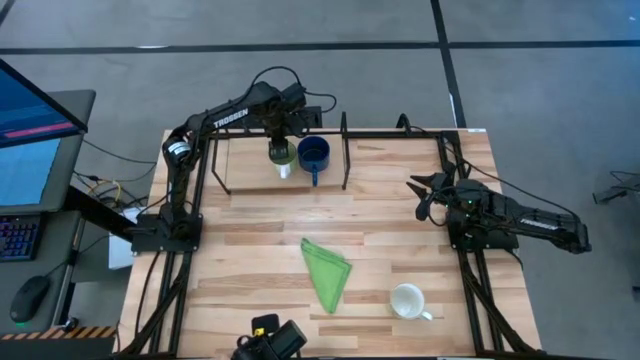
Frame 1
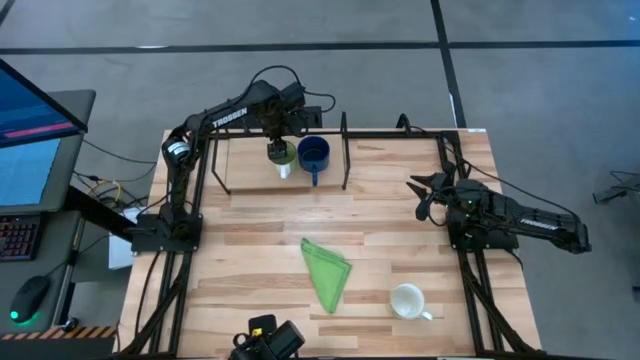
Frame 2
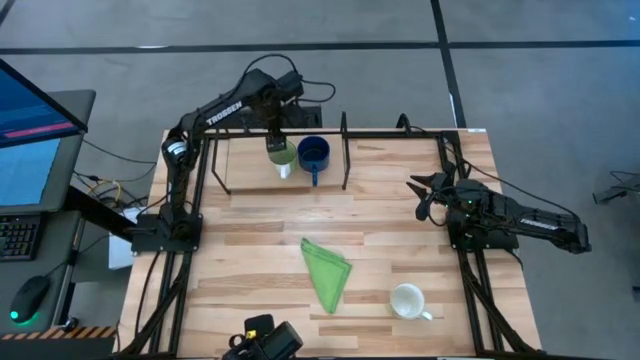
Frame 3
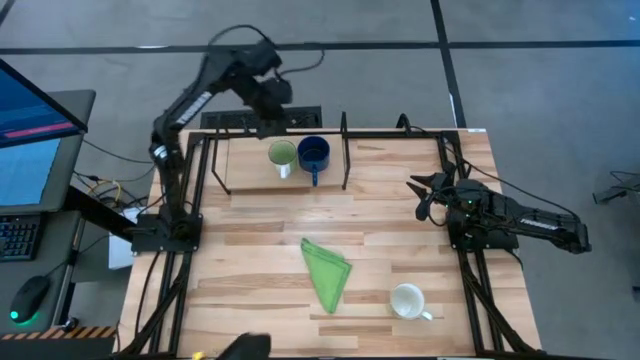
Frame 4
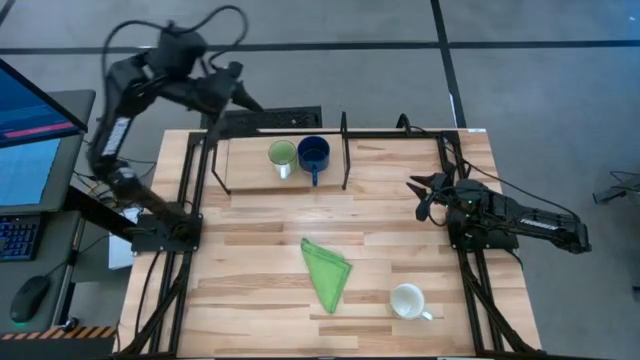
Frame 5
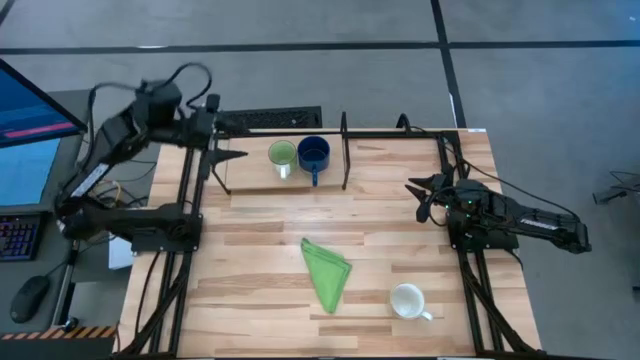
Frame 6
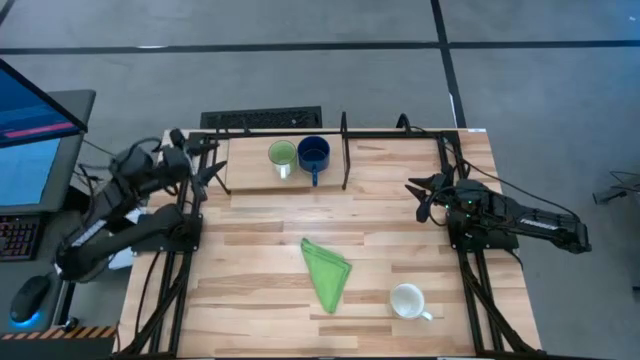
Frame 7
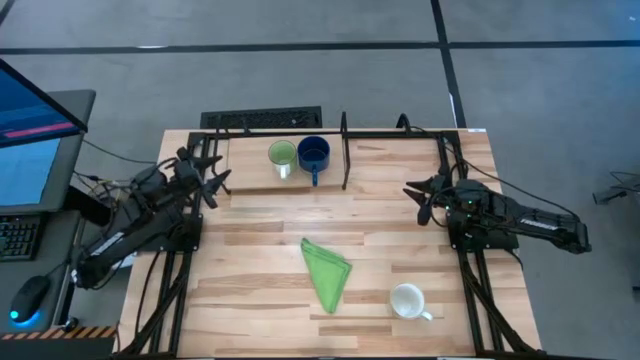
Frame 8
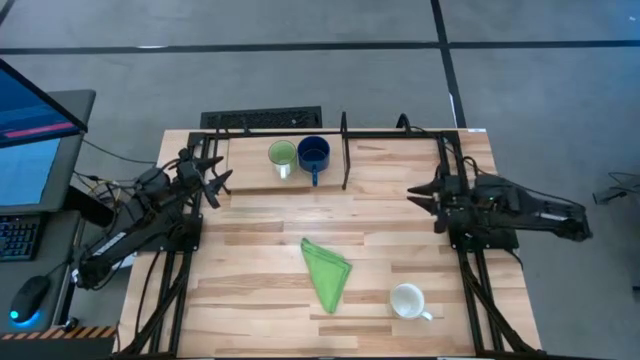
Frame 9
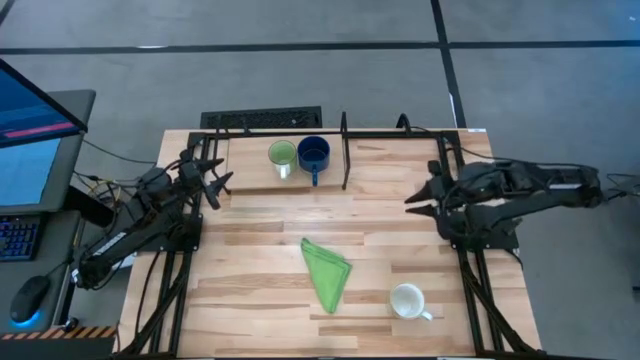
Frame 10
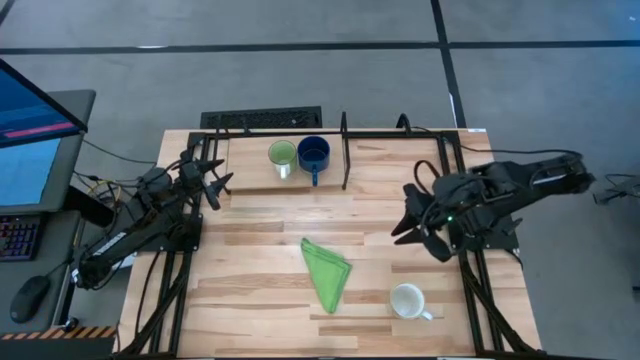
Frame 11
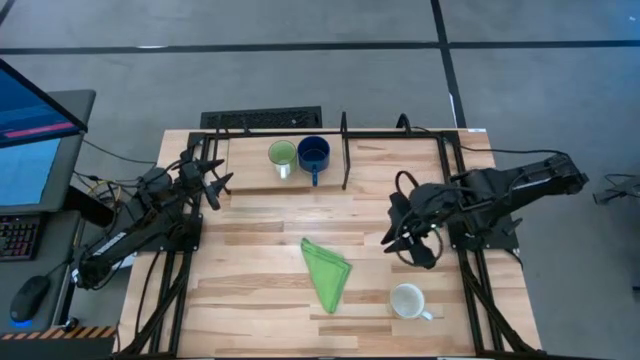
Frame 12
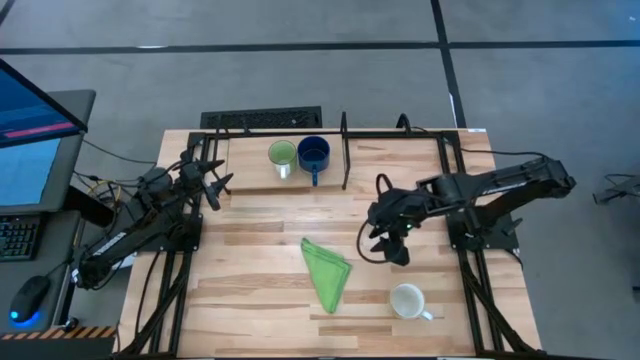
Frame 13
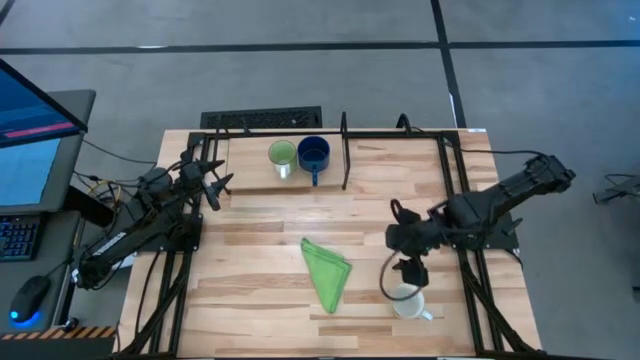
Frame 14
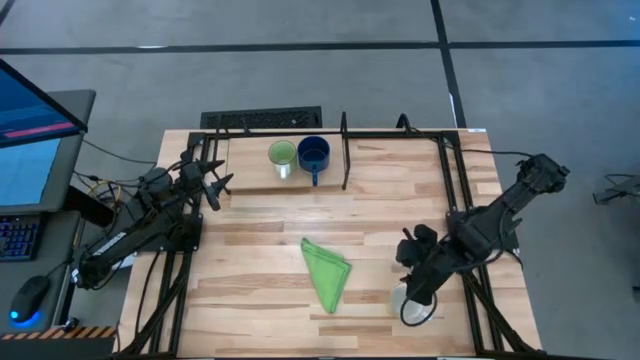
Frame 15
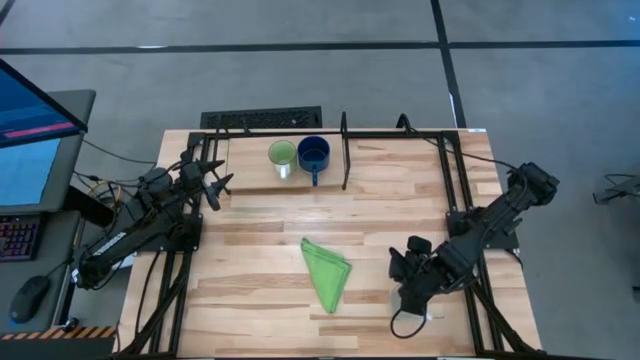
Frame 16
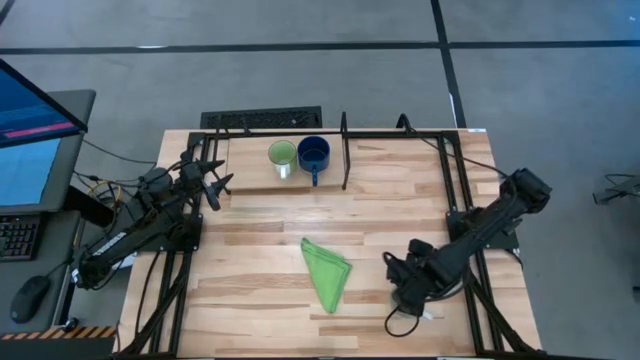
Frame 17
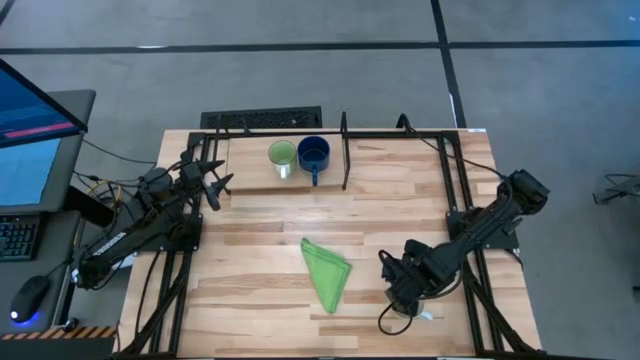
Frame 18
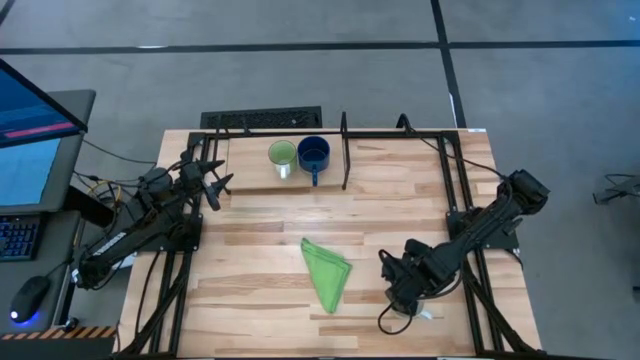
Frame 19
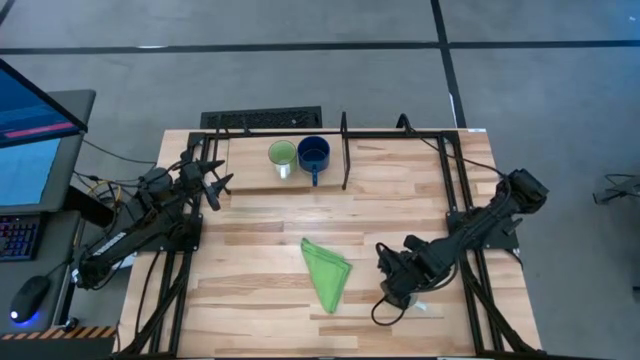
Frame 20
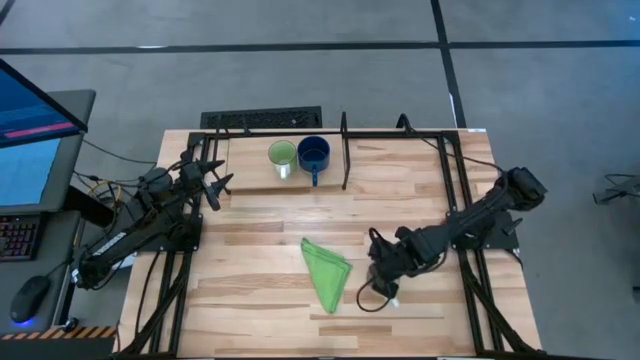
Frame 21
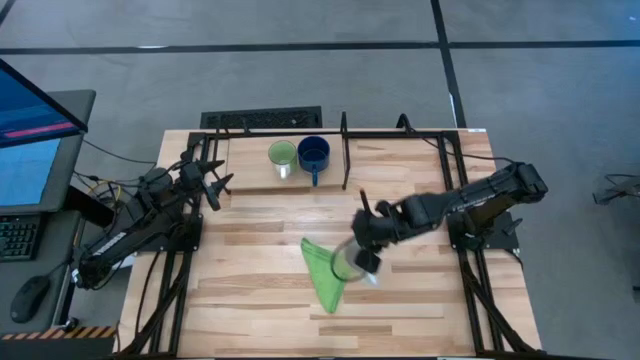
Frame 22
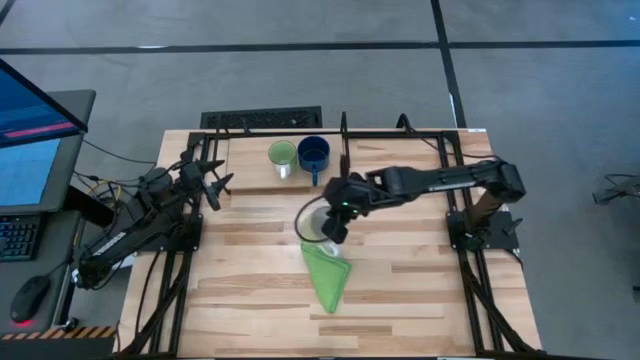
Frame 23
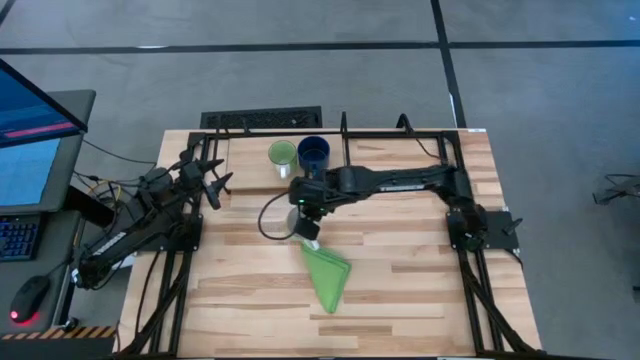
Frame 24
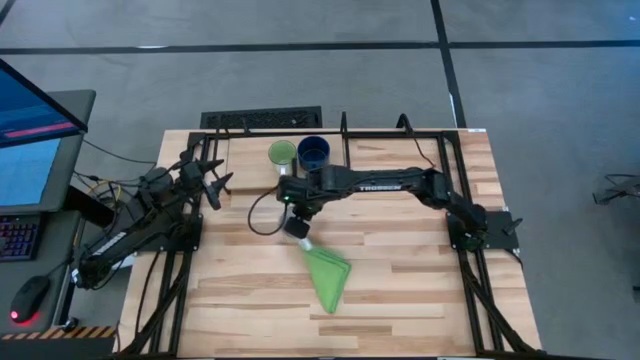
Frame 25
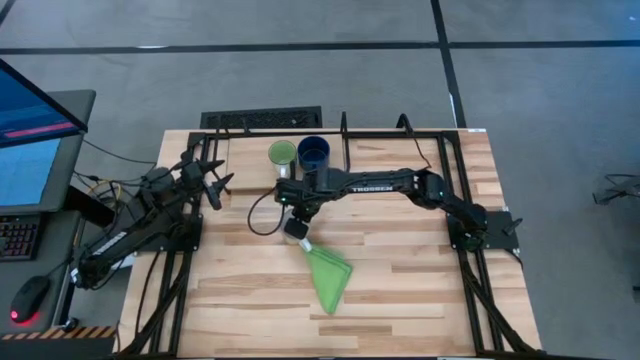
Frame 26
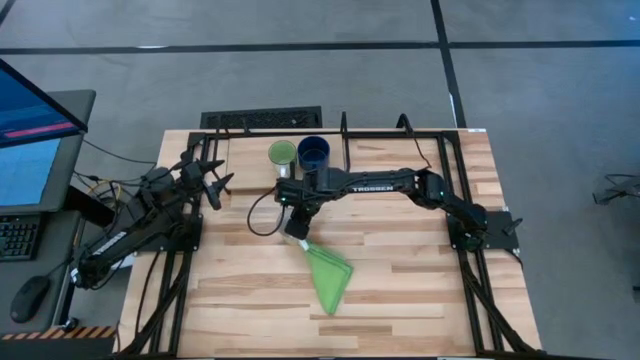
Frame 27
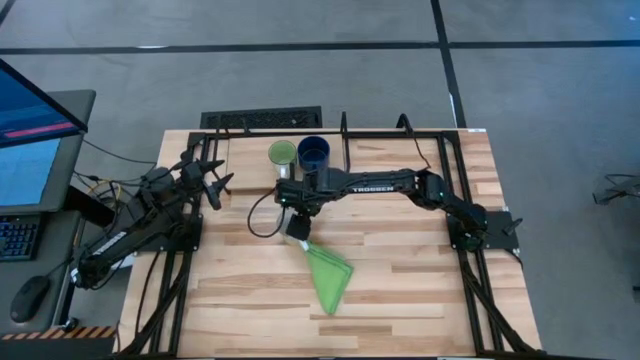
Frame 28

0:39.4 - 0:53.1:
Task: Stack small to large cups/mugs on shelf
Move the white mug to the center of the table

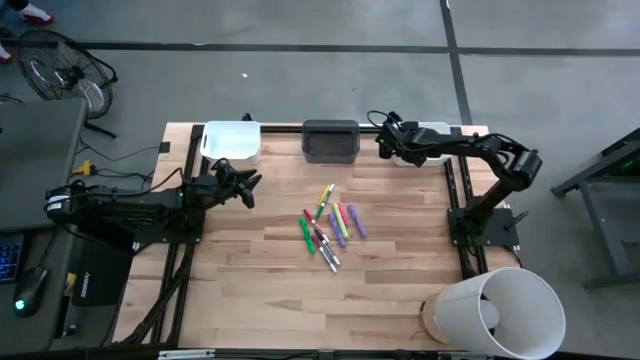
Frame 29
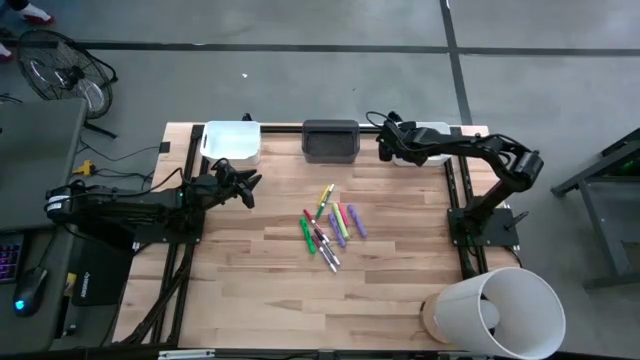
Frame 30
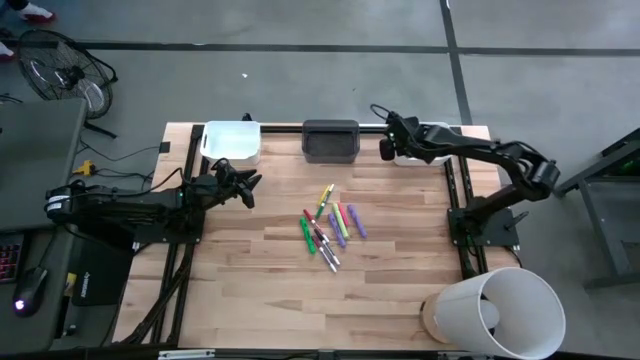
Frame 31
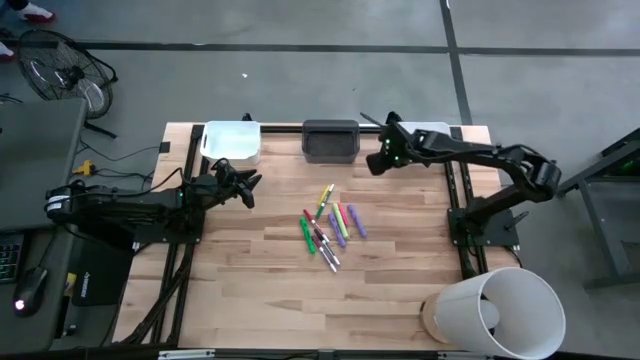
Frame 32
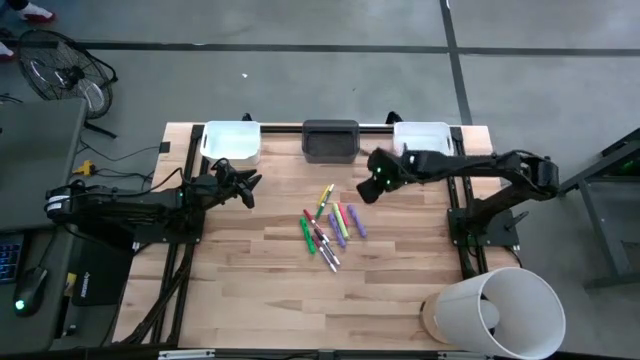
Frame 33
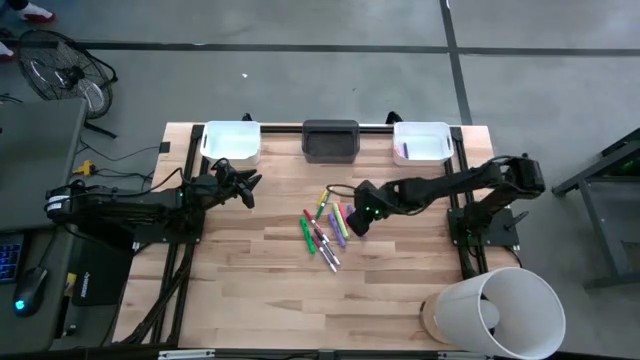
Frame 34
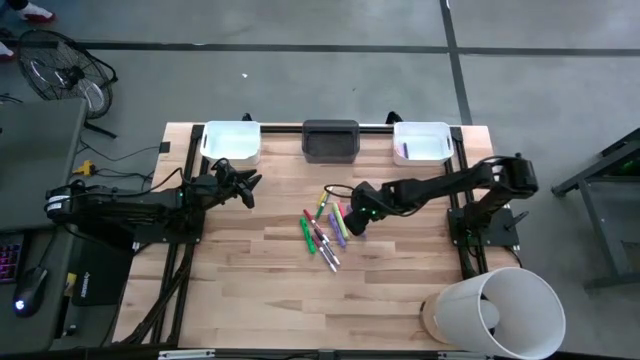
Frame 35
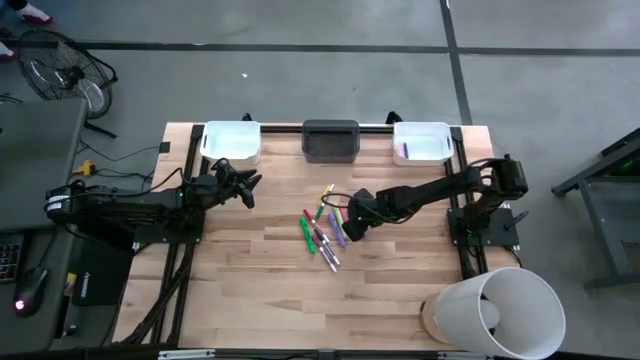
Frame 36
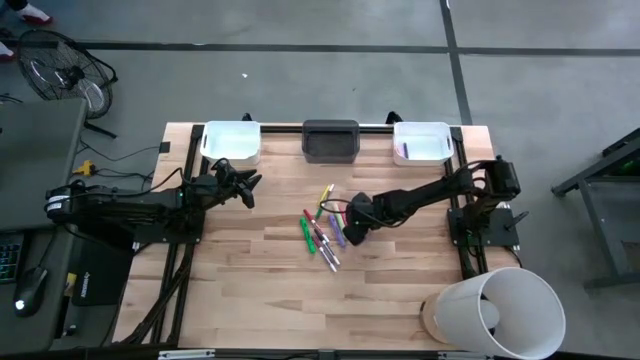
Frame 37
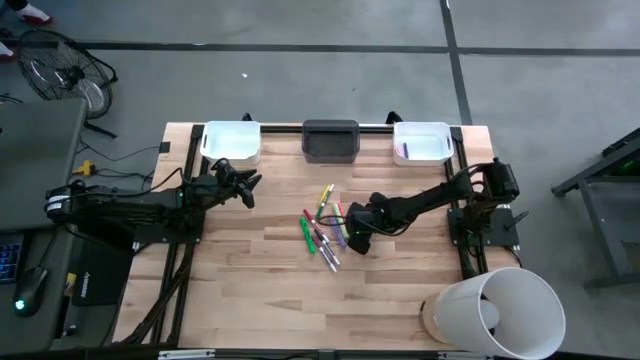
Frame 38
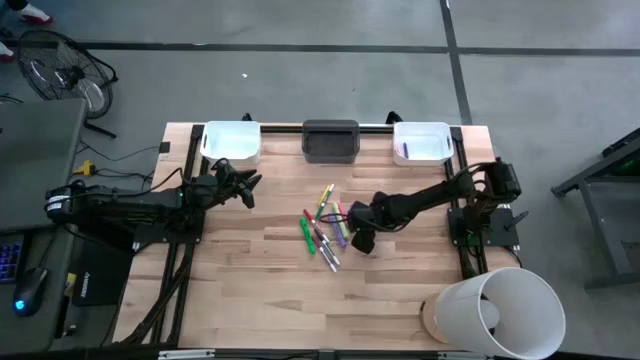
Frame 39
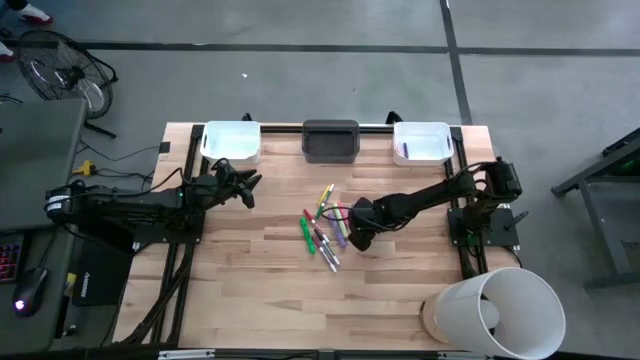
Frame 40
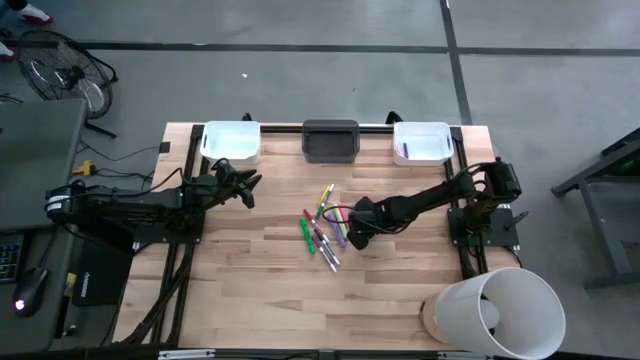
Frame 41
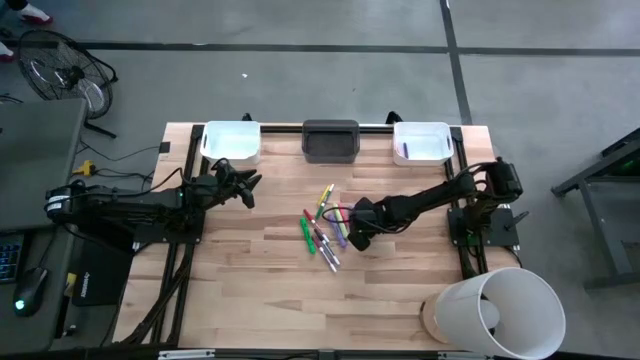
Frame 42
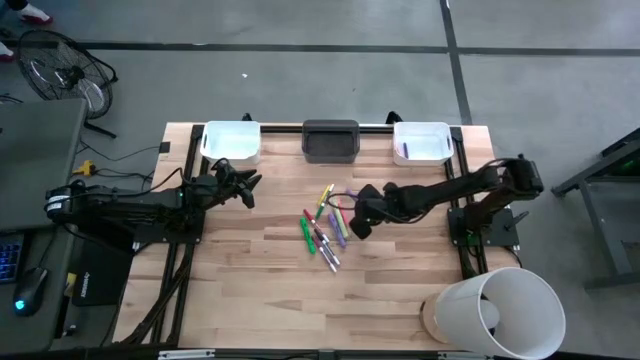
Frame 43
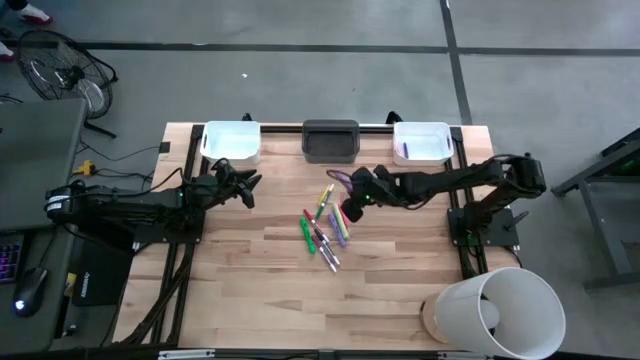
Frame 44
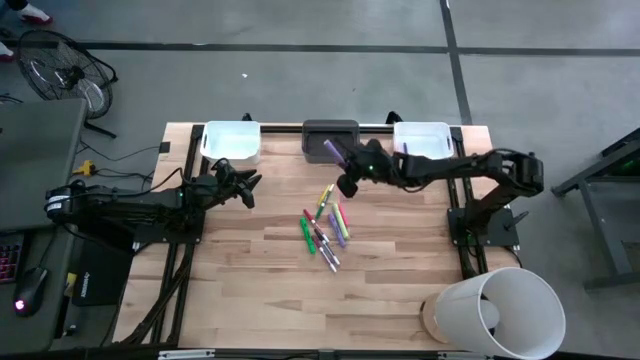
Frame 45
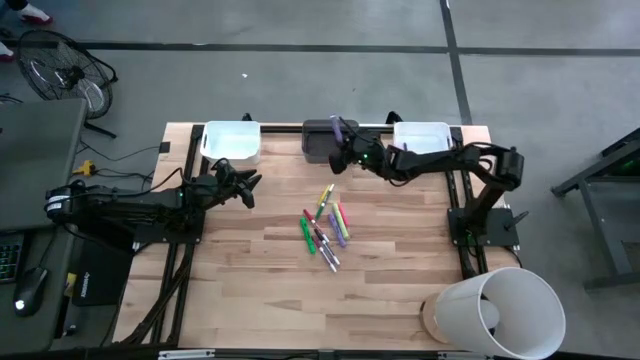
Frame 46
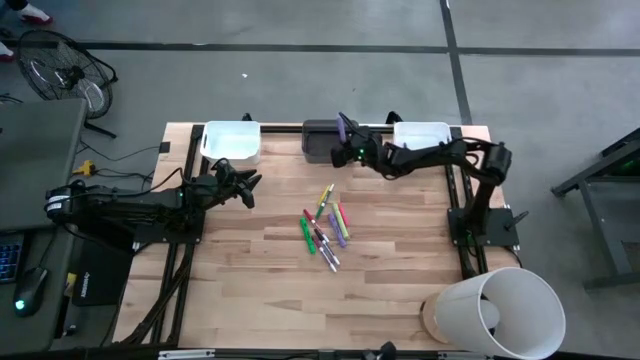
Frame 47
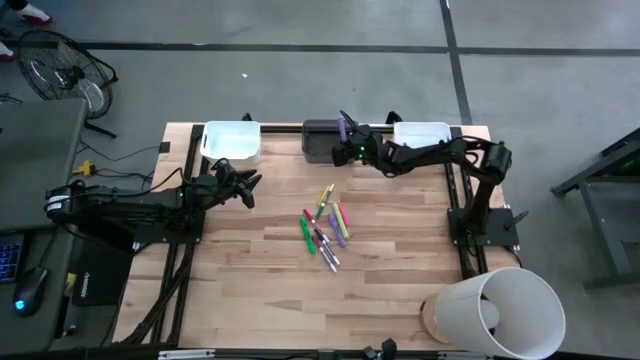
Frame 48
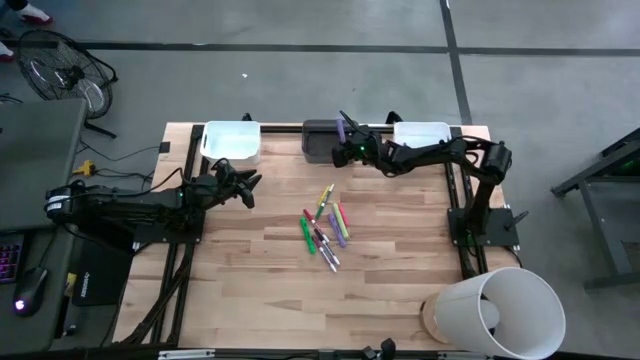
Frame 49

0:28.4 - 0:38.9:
Task: Pick & Place Markers
Put the right violet marker pen into the black bin
